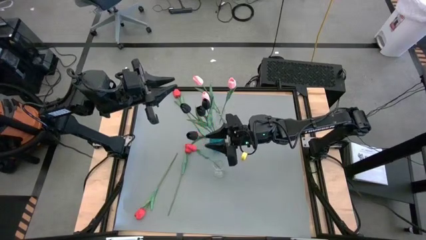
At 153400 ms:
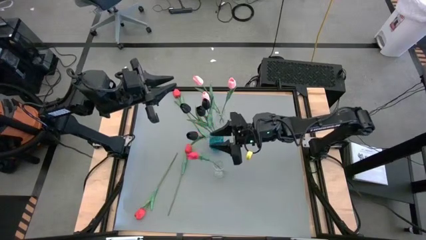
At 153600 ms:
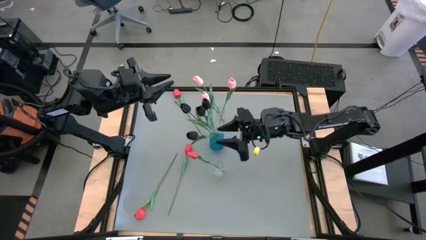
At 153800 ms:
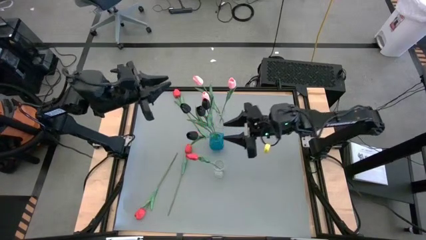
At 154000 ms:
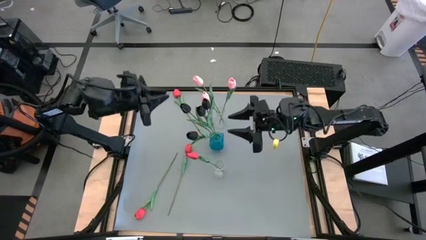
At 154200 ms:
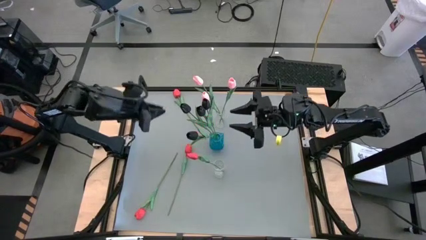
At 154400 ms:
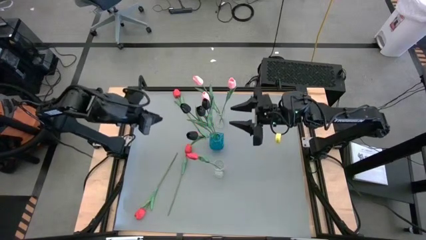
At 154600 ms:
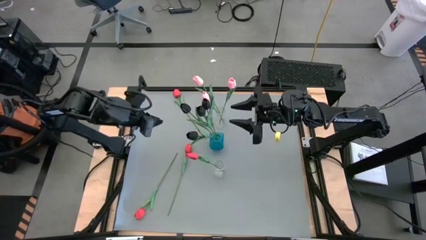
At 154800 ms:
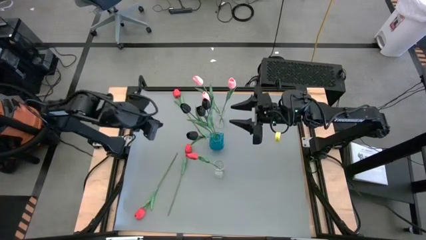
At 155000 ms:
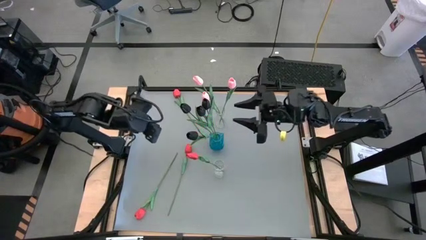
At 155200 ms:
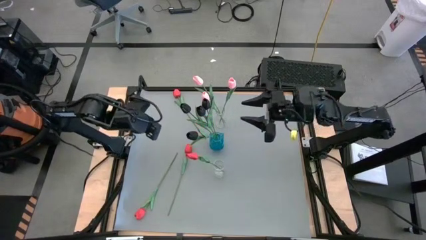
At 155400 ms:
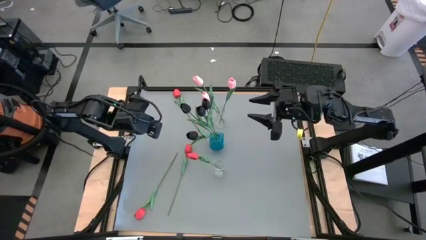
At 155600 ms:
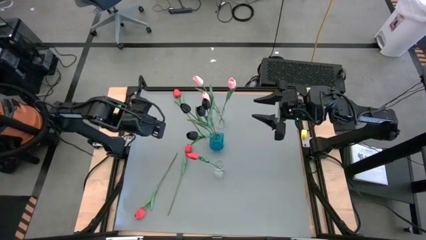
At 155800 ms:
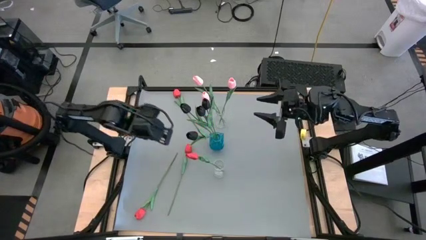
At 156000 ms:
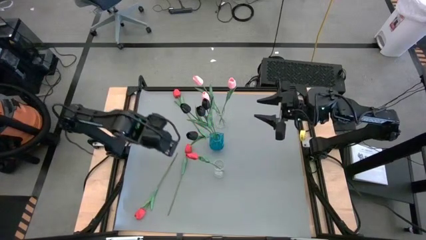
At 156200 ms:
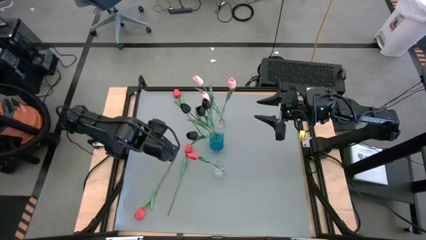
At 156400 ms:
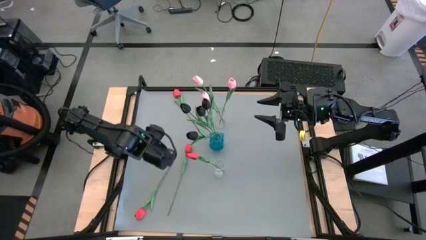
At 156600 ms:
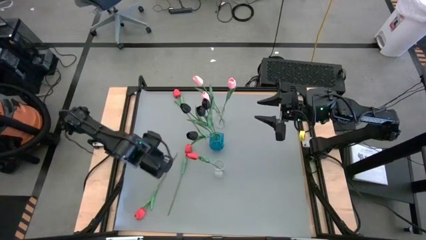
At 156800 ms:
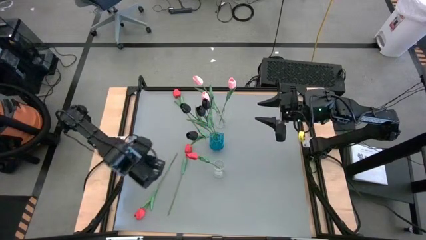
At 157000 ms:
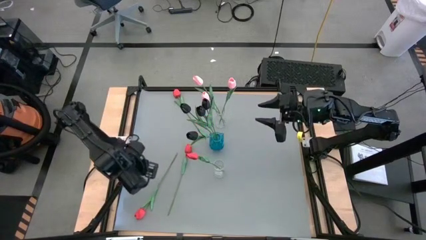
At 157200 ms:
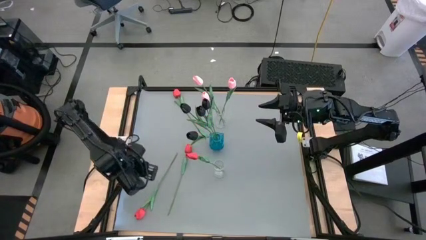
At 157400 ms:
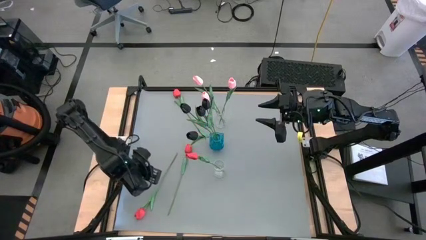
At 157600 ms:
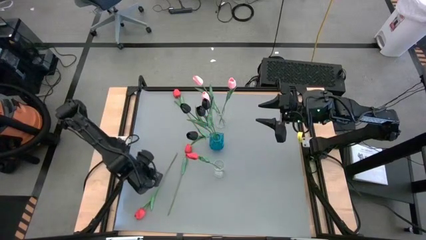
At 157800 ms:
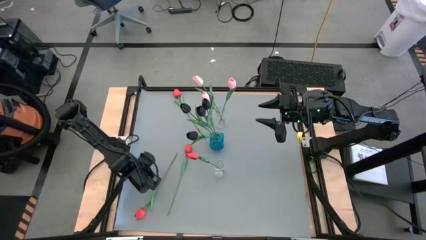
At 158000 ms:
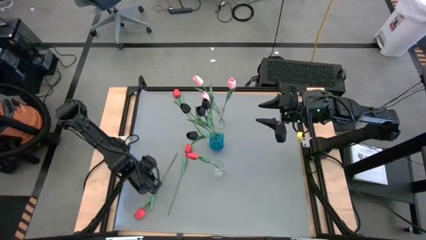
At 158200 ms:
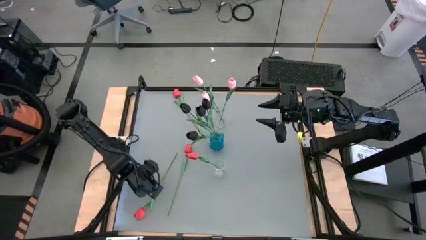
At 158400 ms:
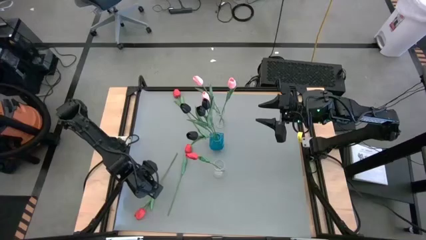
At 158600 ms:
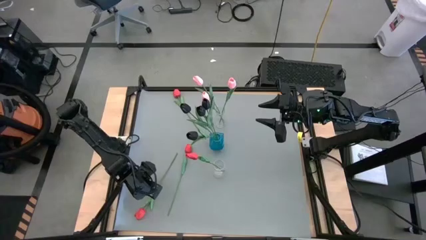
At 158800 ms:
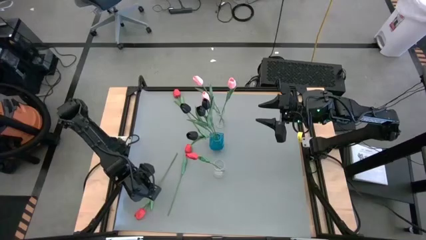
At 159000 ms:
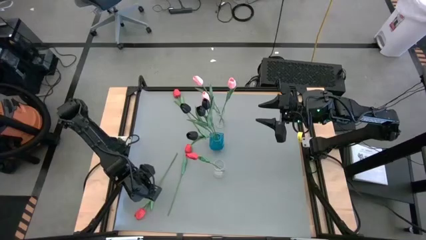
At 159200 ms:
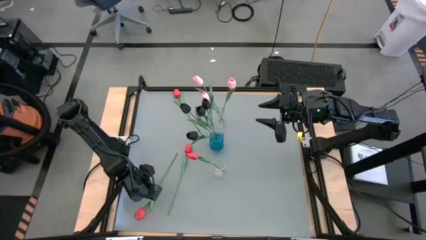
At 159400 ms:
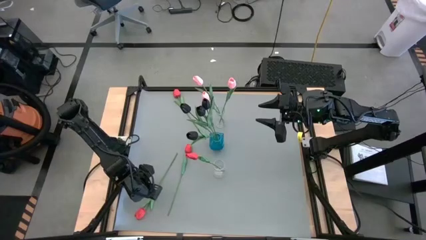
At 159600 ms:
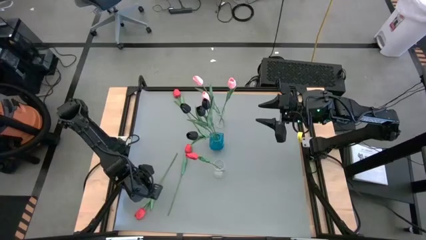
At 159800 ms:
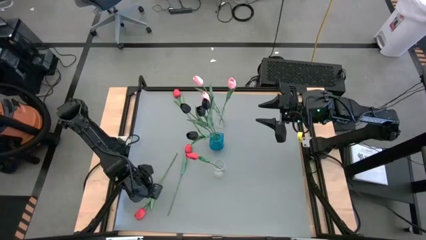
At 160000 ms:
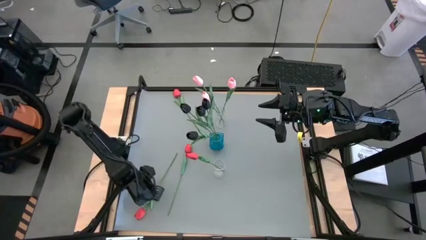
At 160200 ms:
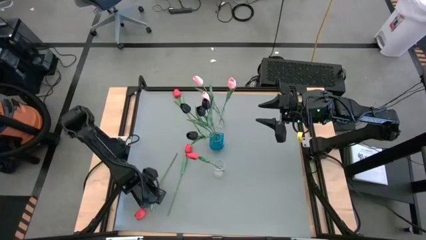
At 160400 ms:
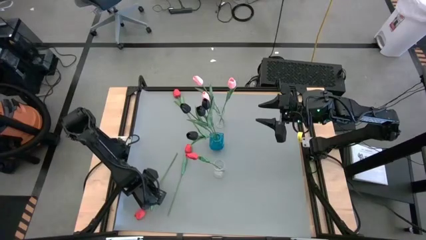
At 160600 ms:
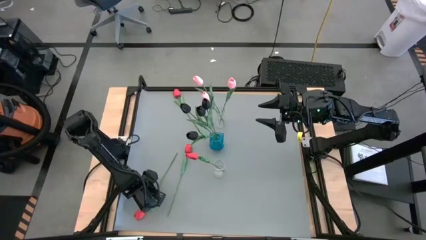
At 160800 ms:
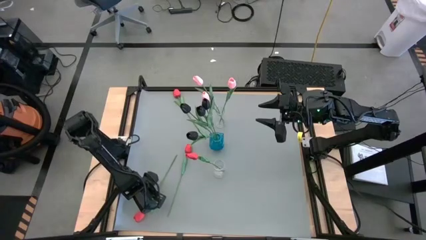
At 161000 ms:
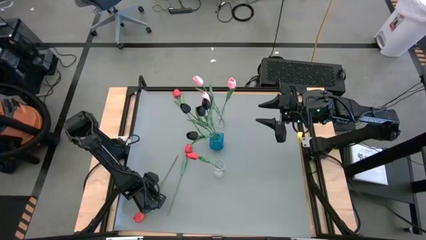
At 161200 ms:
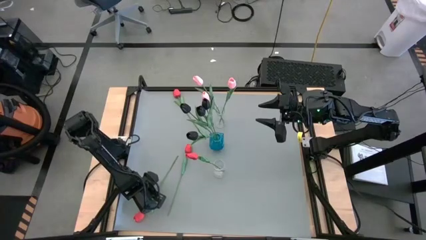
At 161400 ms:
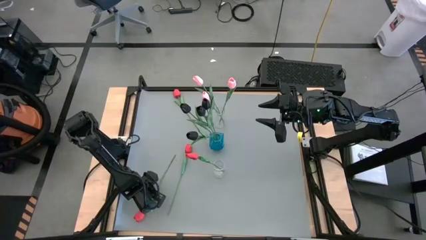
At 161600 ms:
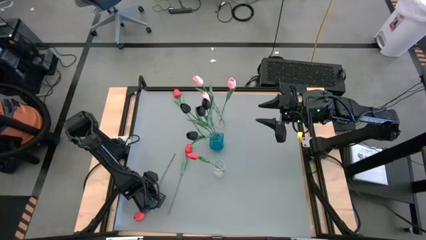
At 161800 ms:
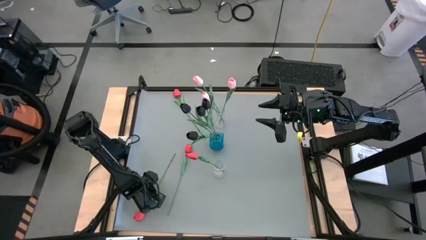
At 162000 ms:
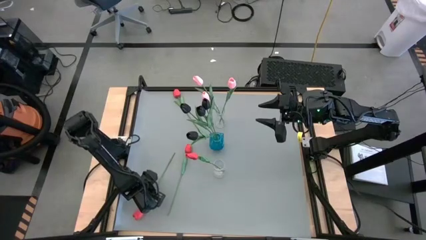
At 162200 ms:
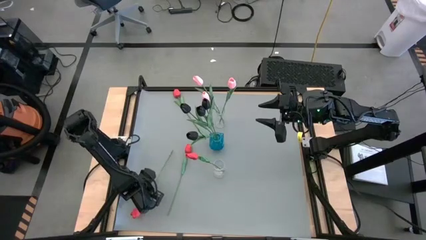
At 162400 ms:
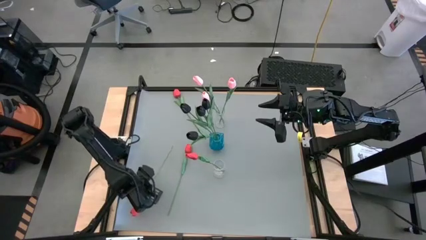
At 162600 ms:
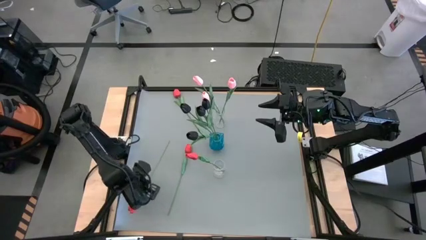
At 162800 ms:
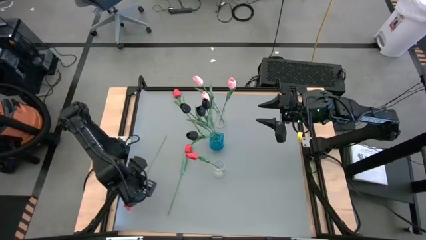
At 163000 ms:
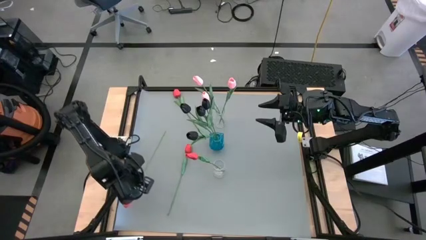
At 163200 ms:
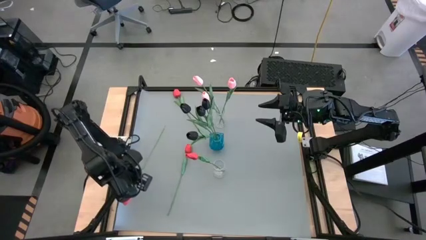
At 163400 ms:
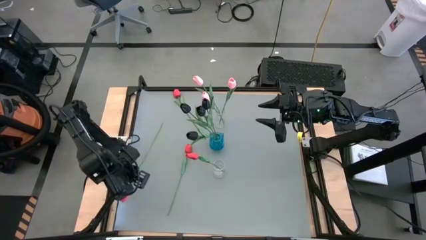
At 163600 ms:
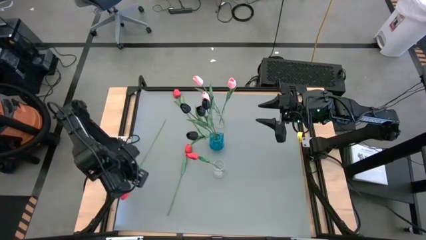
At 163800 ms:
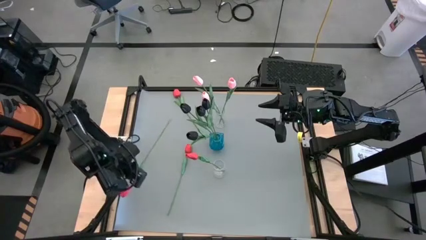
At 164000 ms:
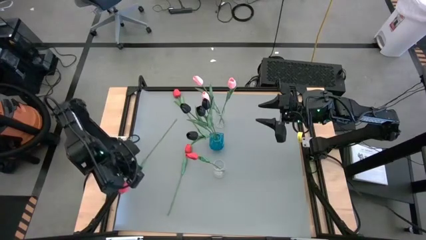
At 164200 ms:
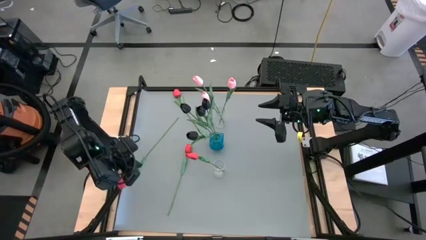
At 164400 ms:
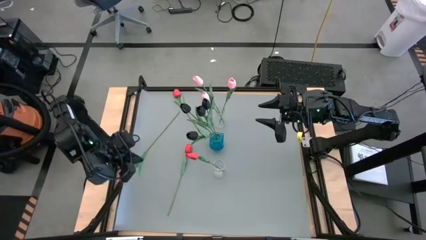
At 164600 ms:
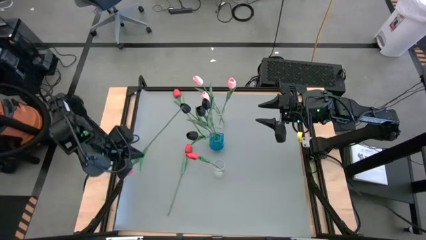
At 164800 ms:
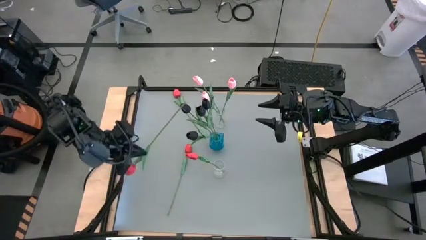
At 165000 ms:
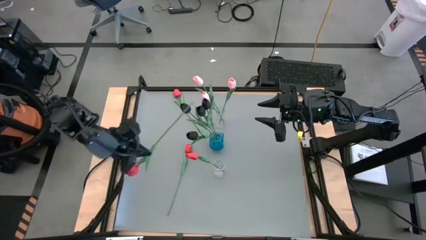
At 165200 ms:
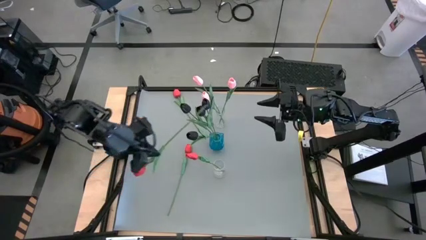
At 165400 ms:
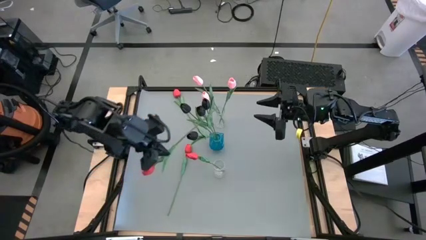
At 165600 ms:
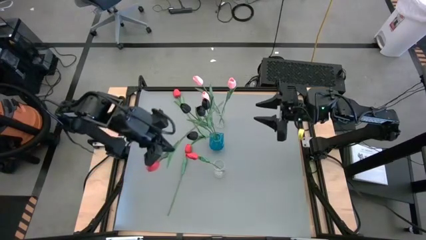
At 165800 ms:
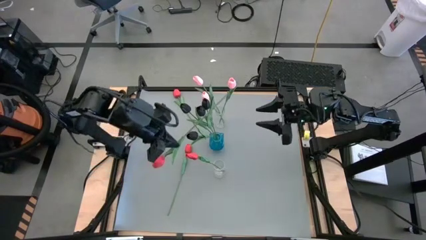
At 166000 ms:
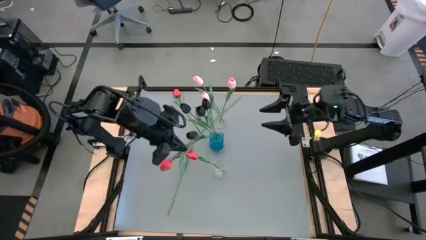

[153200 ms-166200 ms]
Task: Sort flowers into vase by color
Put the bottom left red tulip into the bottom transparent vase
